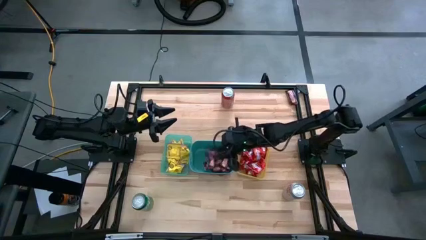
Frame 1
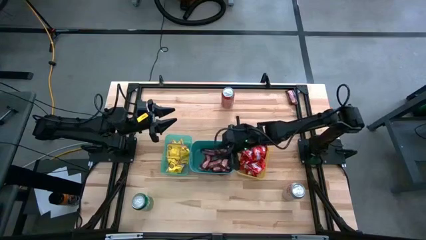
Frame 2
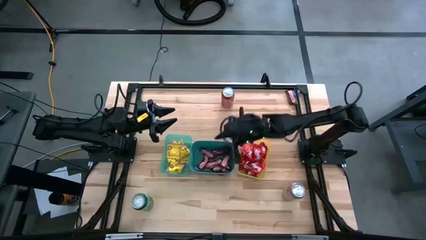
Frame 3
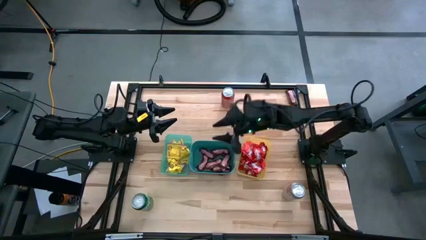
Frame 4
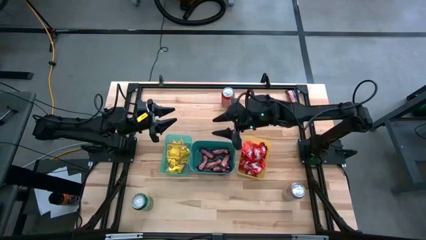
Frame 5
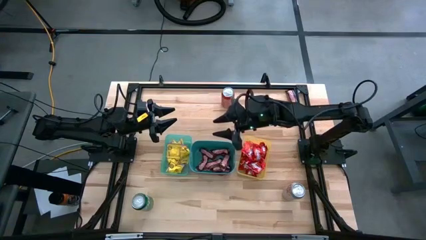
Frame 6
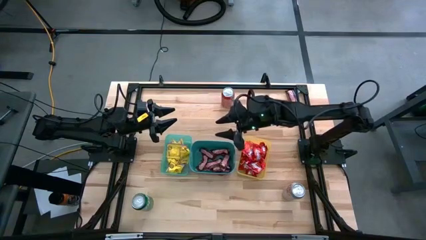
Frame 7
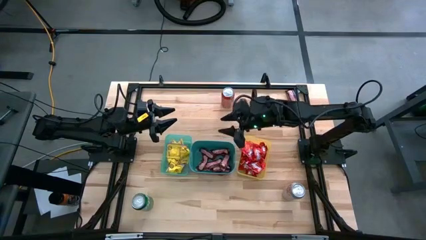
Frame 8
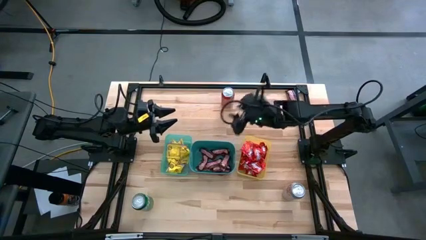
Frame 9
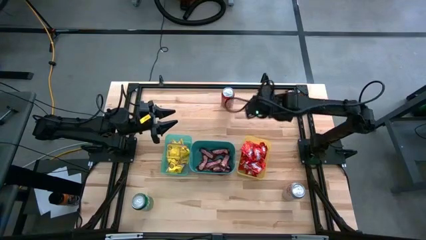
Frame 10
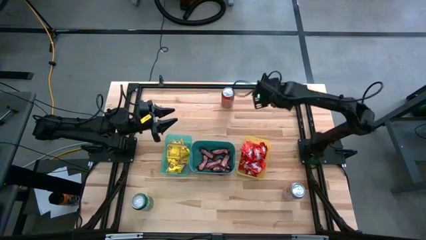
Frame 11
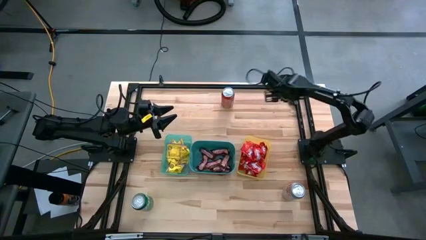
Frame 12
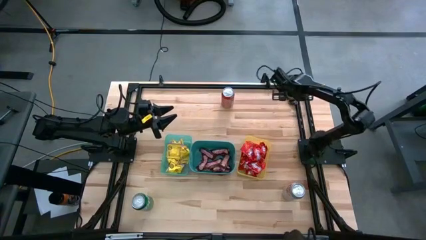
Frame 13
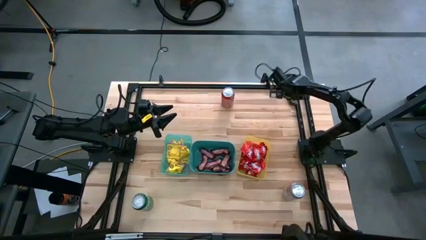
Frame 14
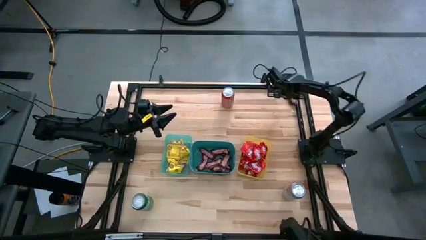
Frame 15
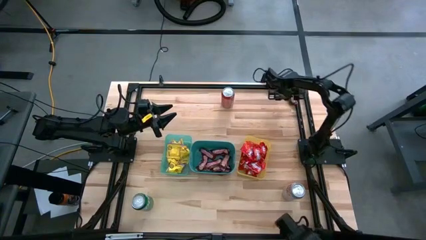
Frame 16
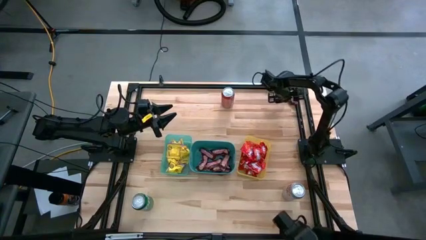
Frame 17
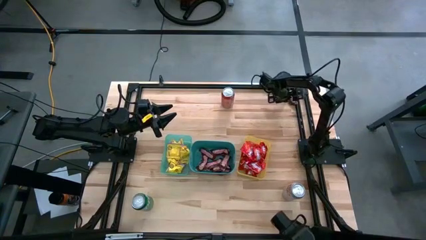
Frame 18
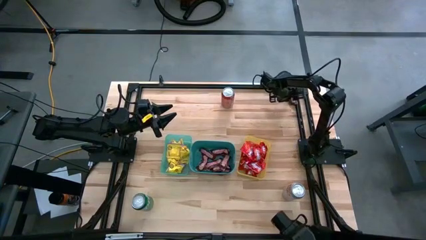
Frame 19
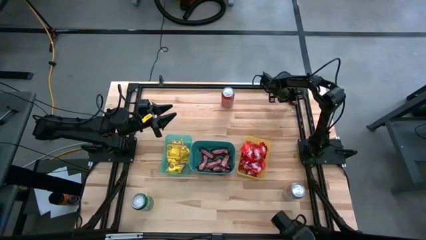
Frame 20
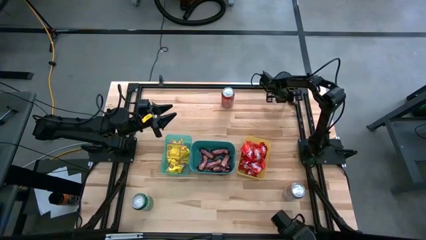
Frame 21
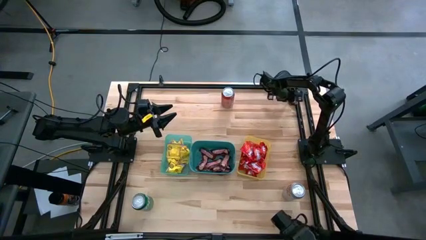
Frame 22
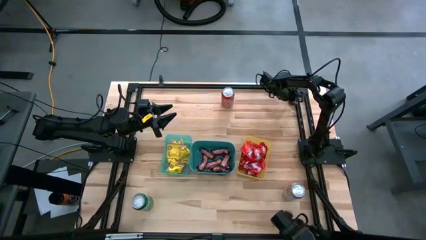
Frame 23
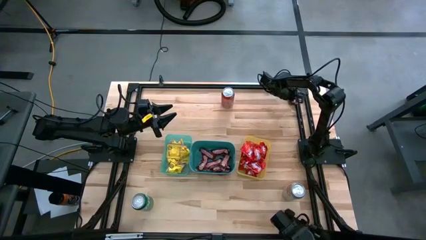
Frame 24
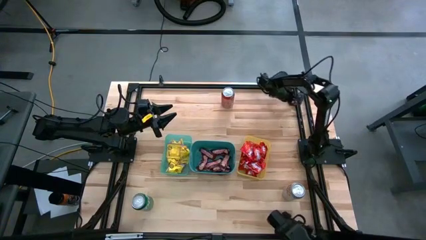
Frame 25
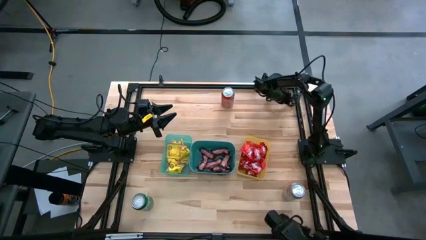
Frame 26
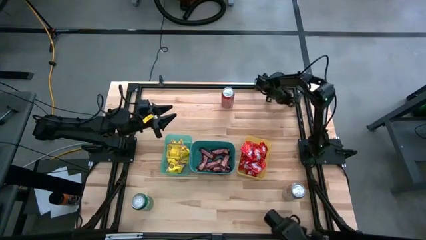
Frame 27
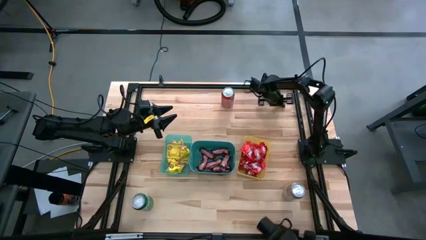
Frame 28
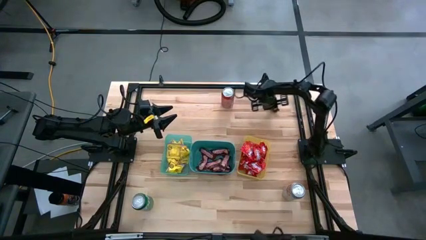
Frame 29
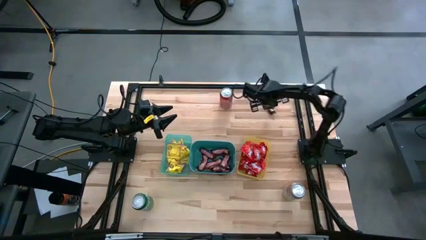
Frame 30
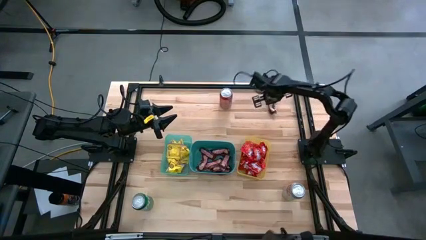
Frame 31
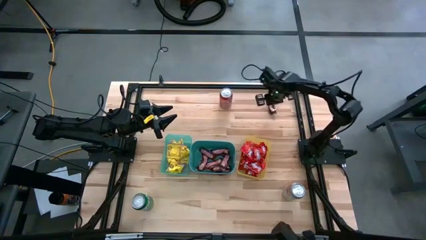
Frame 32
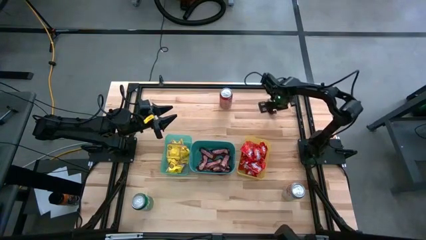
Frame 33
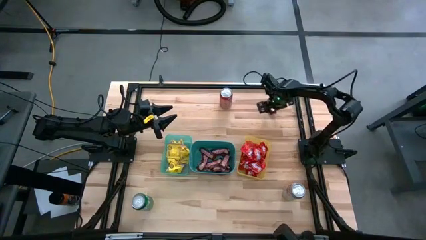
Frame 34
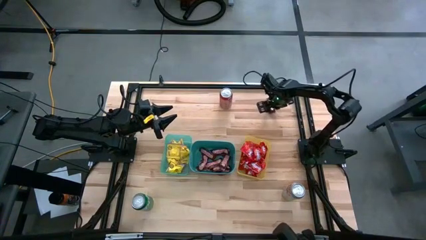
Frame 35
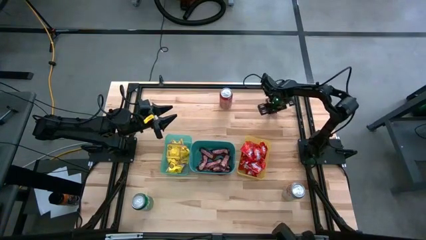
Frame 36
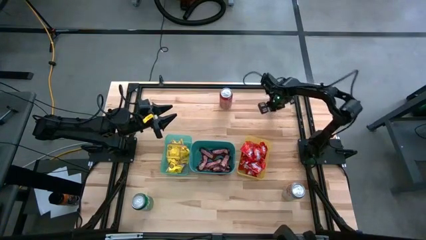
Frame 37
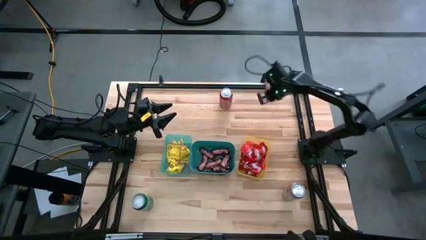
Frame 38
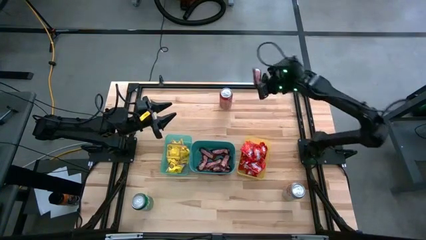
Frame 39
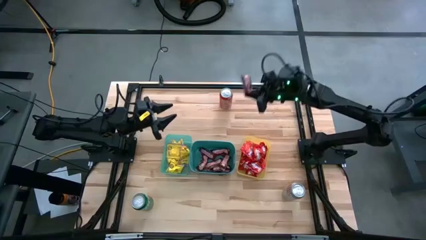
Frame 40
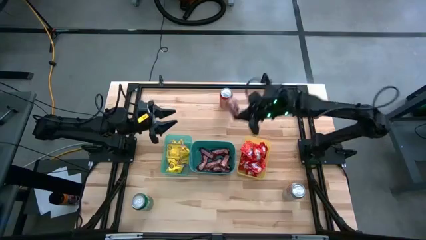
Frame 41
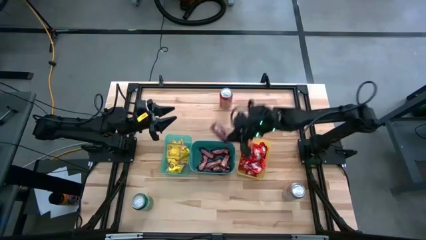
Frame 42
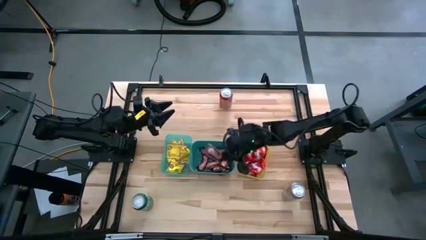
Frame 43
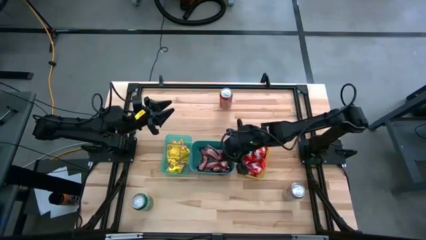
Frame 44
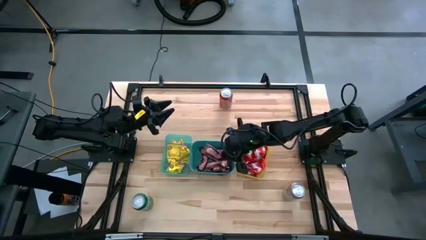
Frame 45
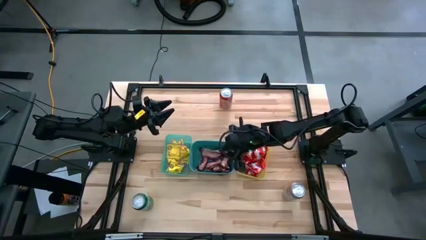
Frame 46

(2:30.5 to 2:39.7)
Task: Sort candy
Put the brown chocolate into the green bin

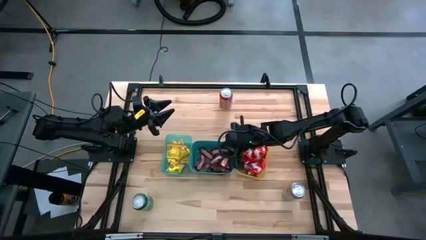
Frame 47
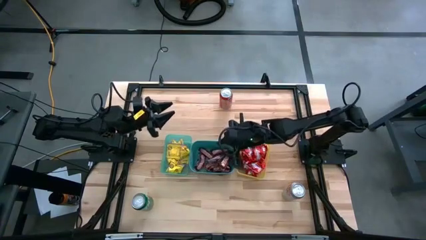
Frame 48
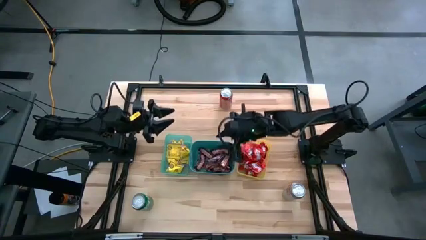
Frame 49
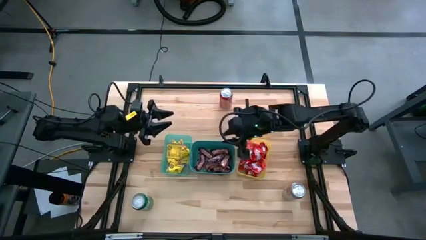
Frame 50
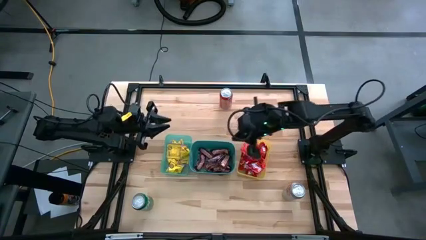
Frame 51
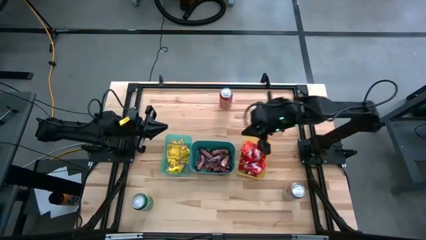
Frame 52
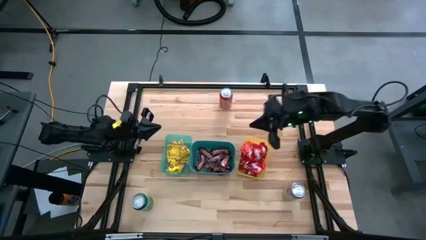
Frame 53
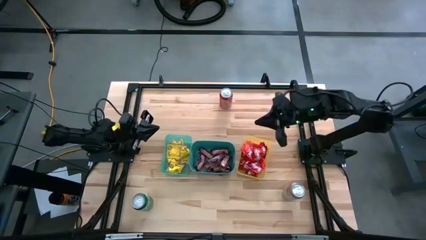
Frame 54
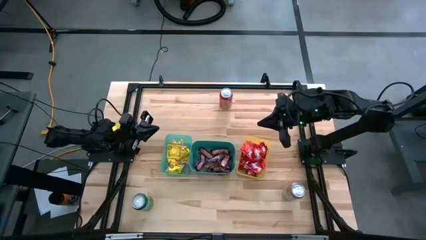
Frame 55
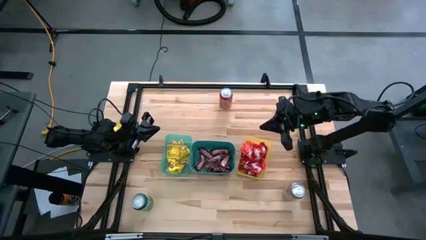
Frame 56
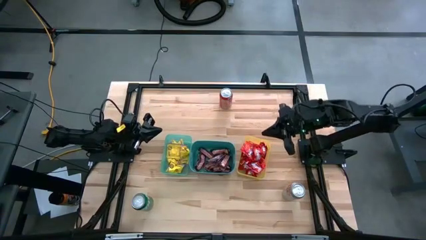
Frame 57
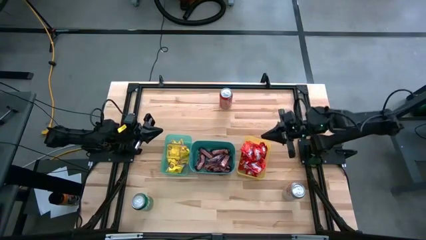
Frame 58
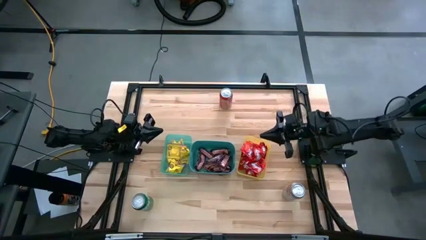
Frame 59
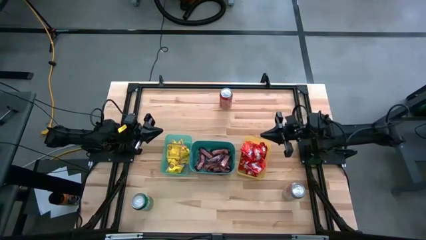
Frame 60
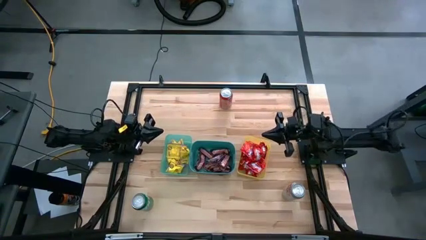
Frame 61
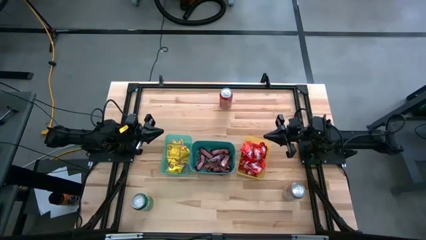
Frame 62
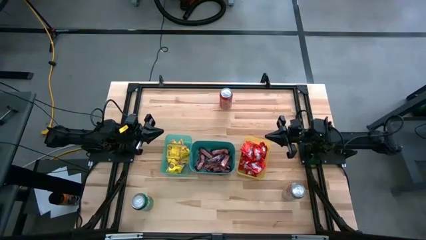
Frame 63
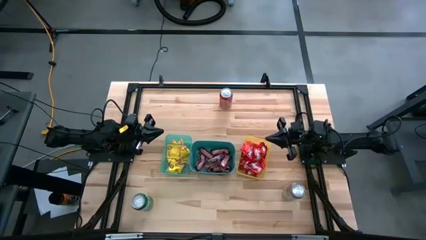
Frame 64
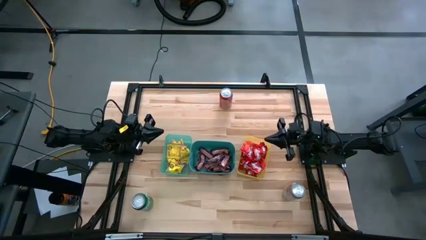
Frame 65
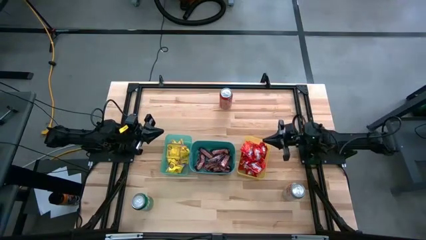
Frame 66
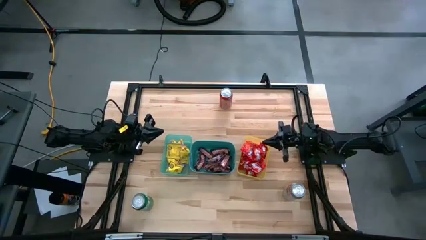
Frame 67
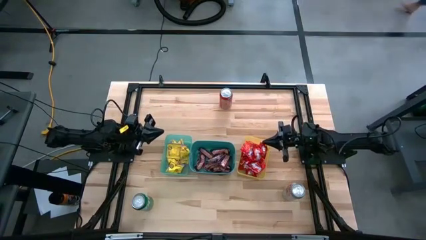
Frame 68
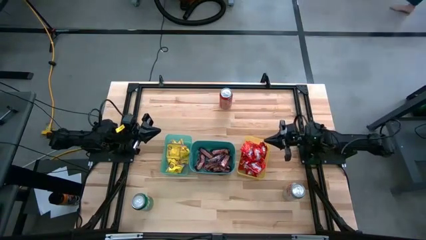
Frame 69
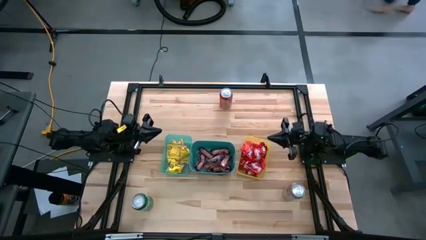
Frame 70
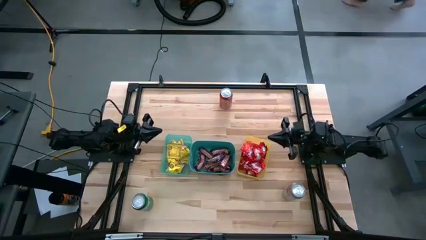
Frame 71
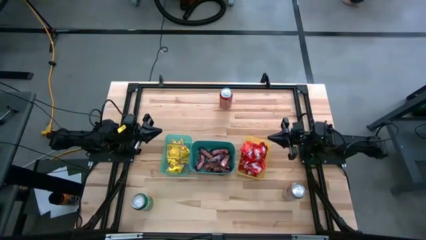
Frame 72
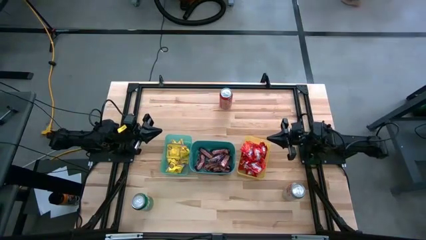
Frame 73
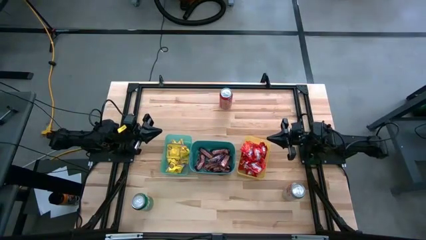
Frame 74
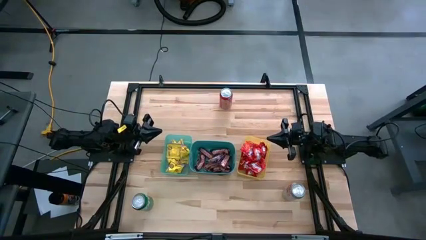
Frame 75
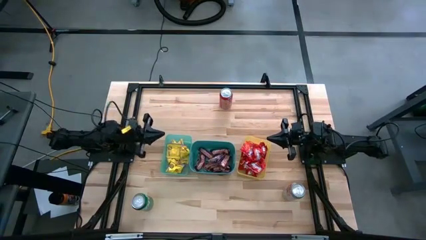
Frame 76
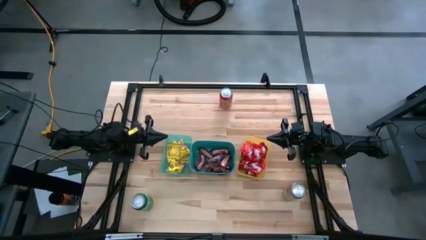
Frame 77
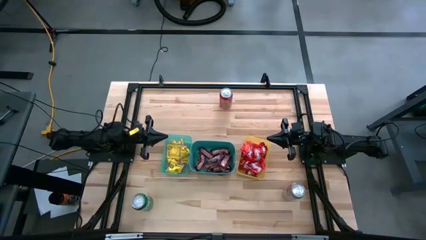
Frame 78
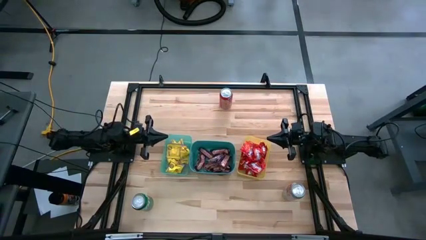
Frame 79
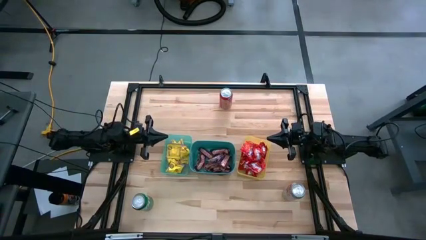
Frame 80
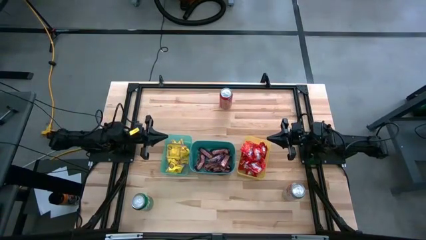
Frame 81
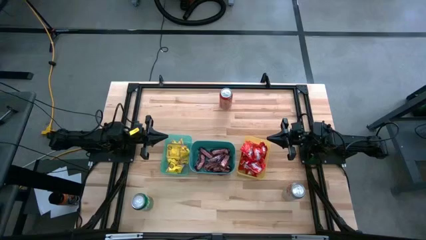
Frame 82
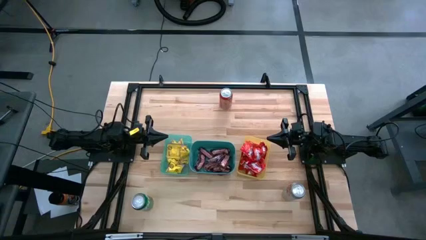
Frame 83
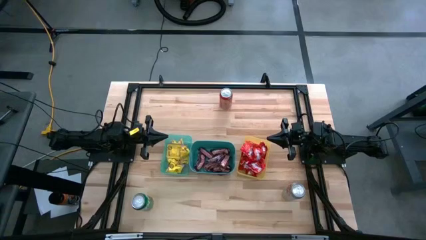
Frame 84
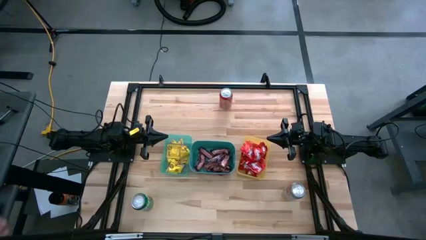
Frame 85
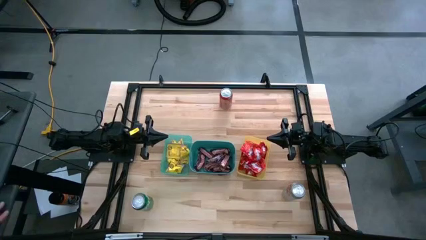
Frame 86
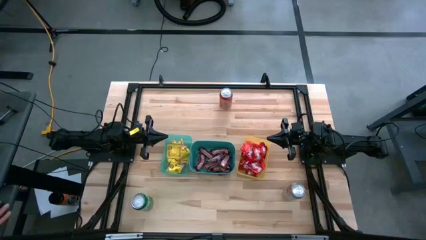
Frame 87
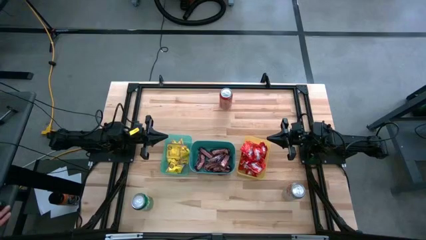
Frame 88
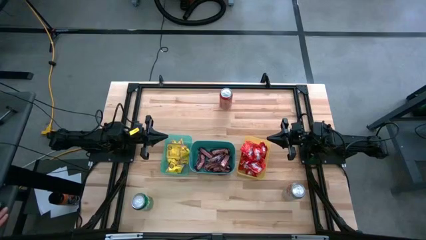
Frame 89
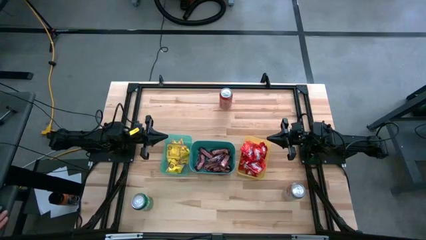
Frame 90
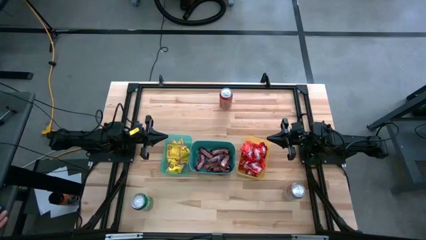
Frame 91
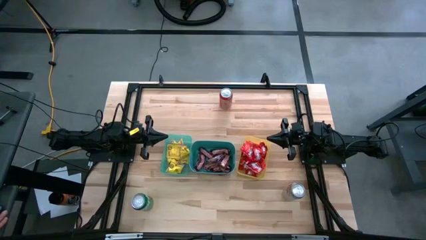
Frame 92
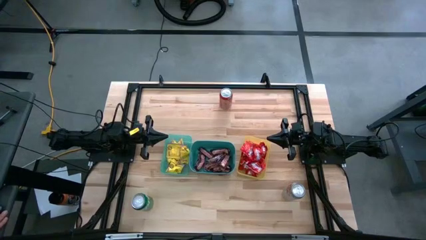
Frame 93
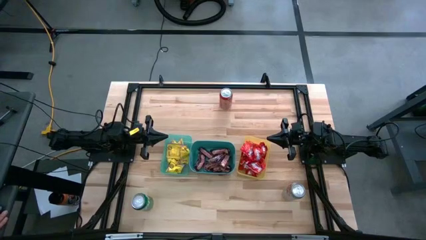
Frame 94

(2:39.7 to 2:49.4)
Return to Home Position
